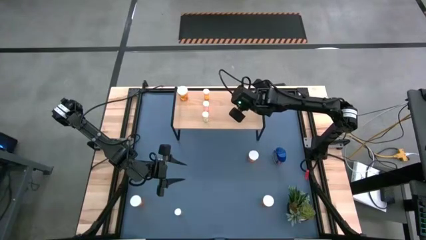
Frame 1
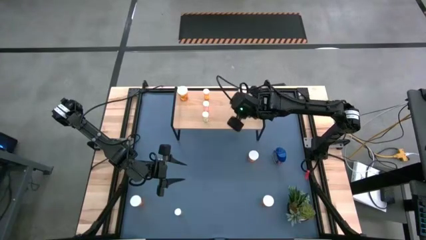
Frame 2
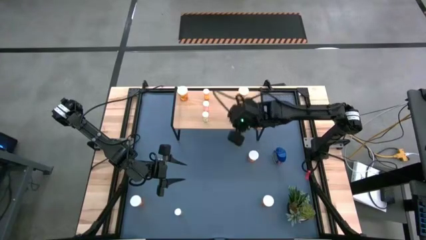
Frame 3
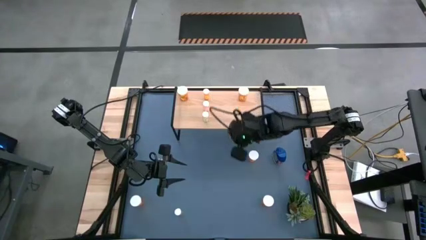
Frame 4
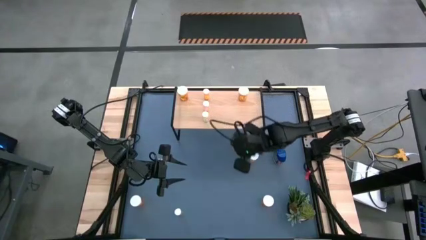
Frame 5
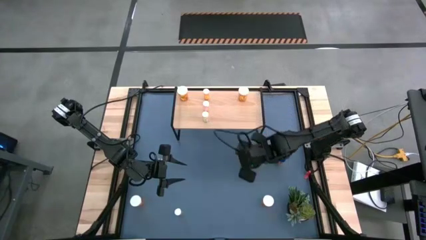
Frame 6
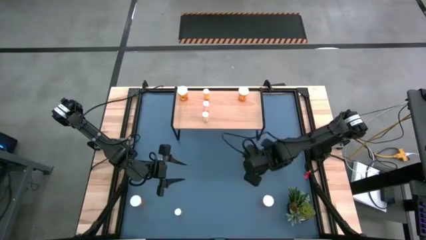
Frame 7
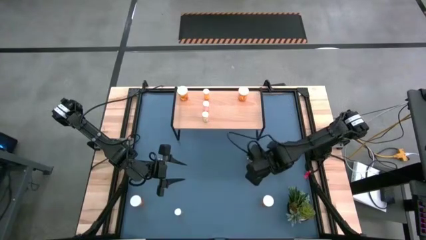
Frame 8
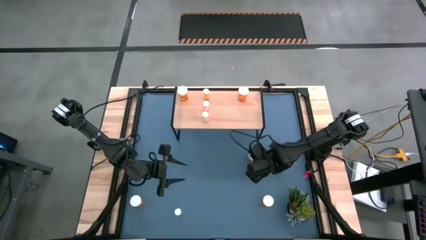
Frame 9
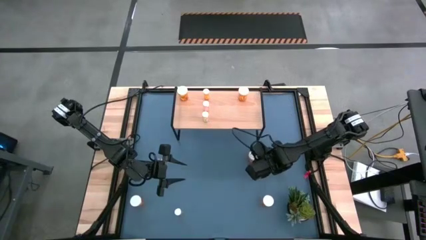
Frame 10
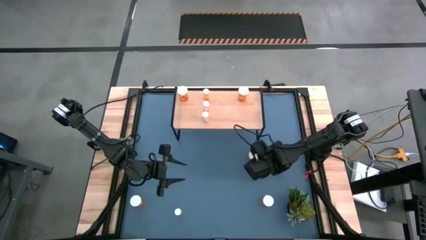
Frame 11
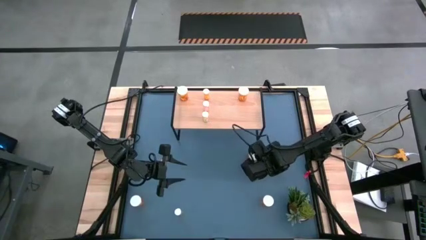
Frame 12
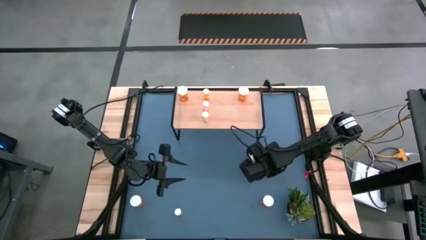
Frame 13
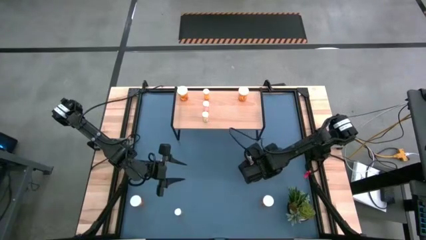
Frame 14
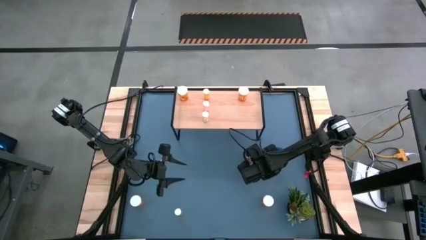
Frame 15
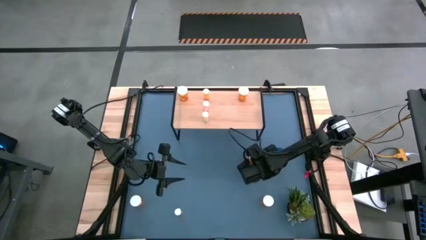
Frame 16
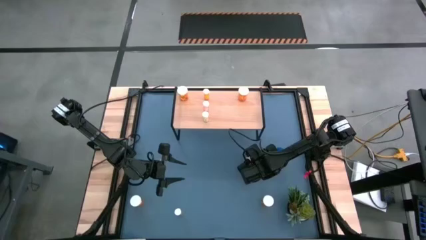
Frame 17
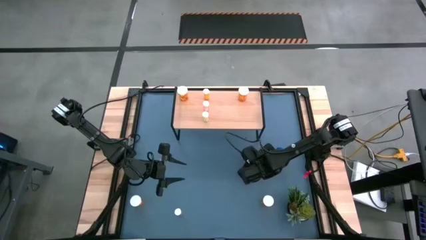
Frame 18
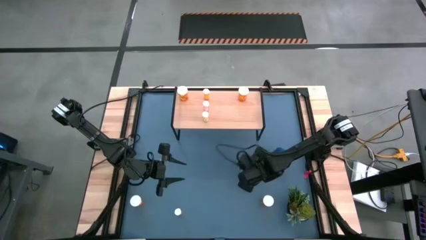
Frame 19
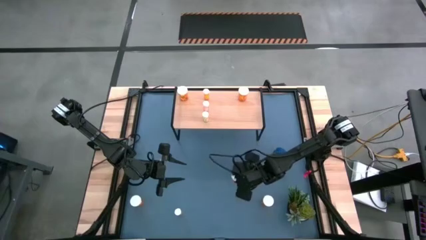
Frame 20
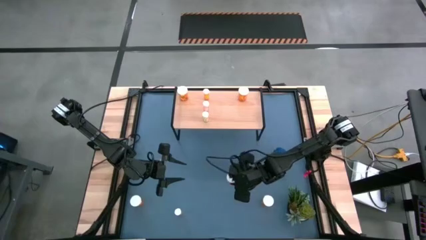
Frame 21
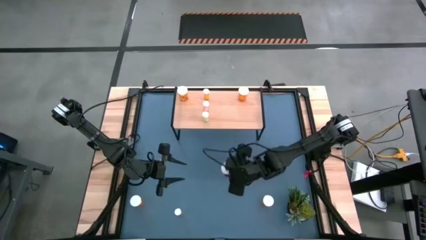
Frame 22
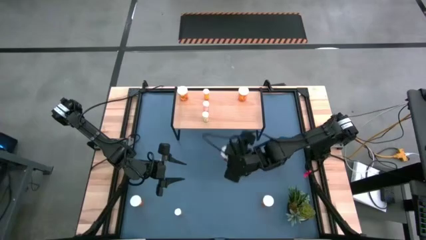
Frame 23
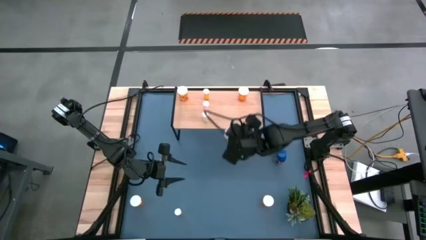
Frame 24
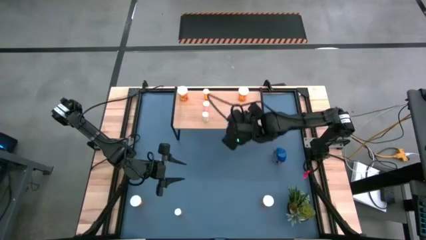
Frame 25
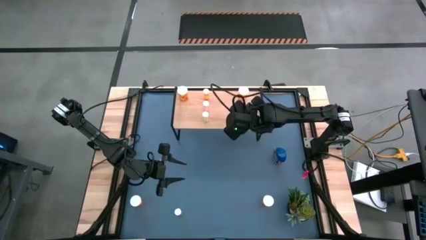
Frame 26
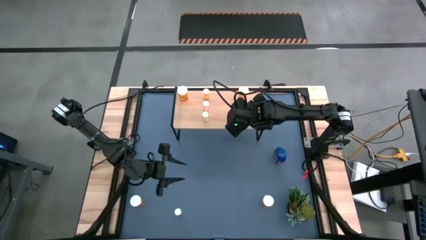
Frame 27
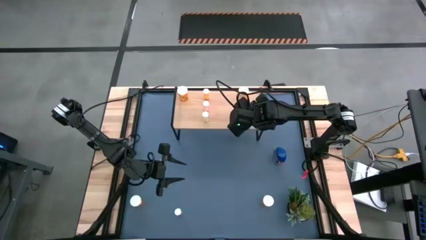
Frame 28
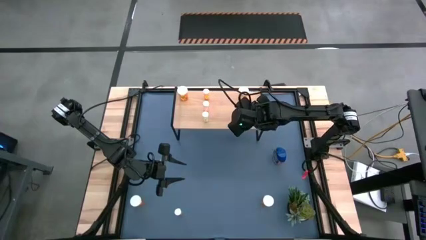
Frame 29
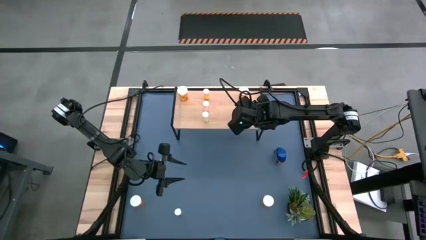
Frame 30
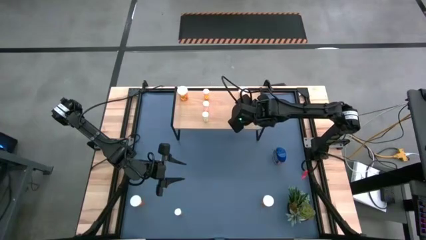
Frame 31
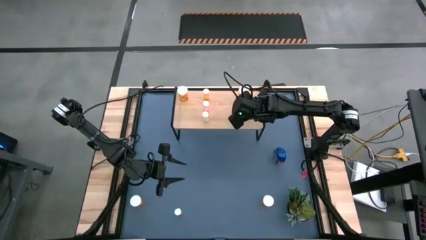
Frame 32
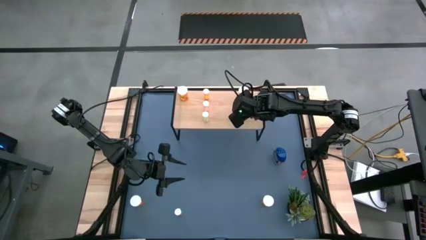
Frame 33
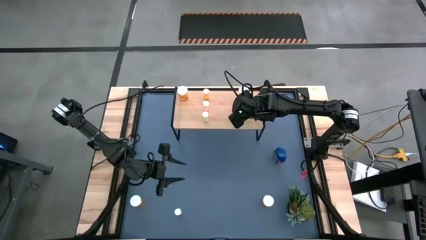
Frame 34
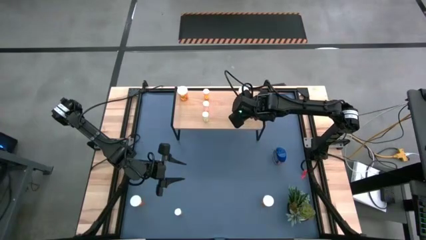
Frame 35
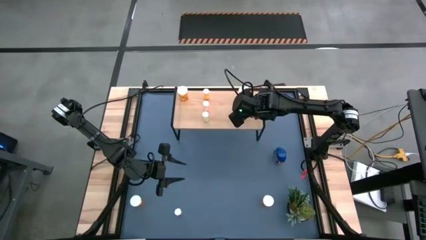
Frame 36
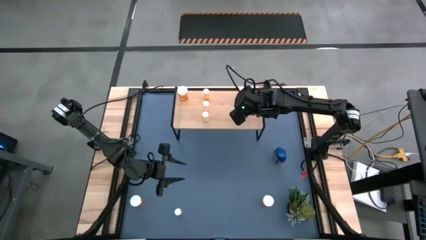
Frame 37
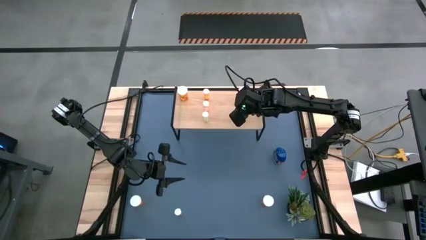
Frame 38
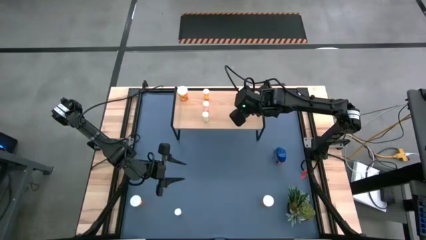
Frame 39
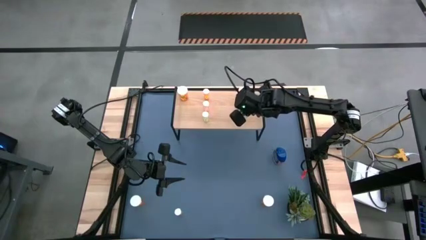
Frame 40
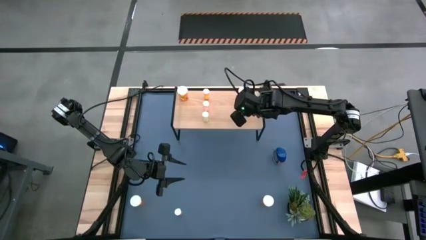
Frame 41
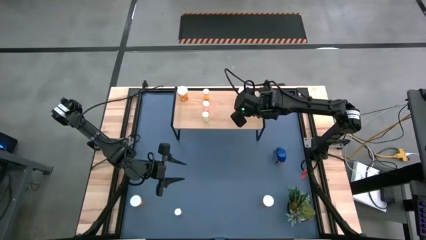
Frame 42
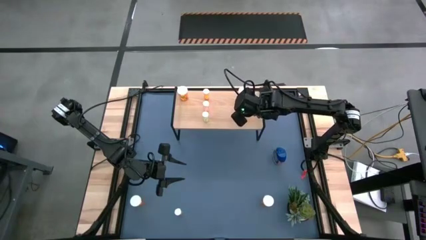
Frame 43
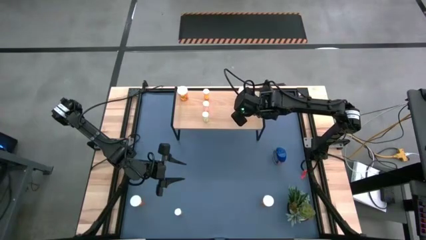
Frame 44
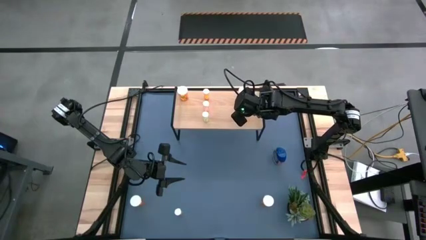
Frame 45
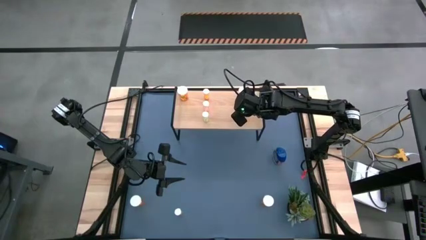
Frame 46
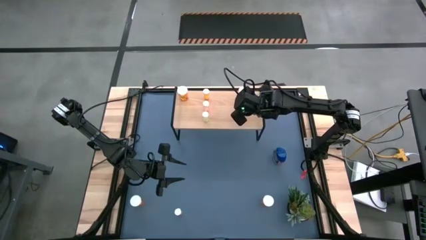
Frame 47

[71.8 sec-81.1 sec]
Task: Pick and place medicine bottles onto shelf by color
Align the large orange pill bottle with the other large orange pill bottle on the shelf

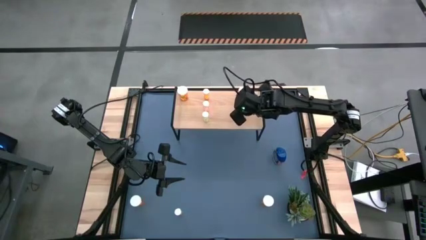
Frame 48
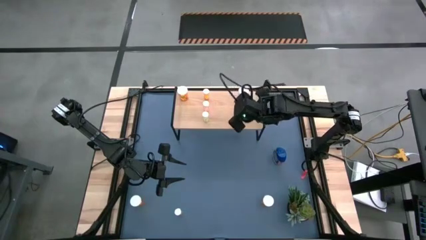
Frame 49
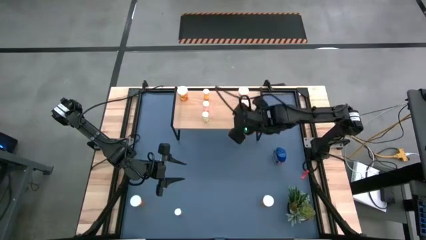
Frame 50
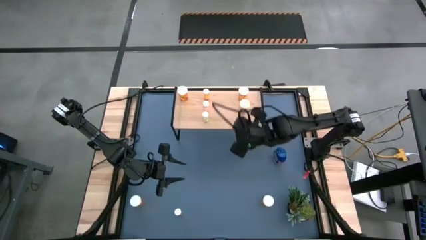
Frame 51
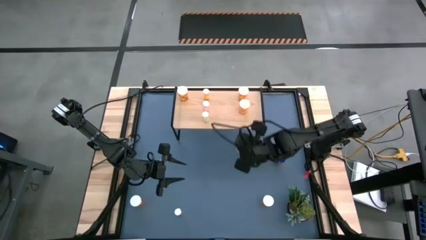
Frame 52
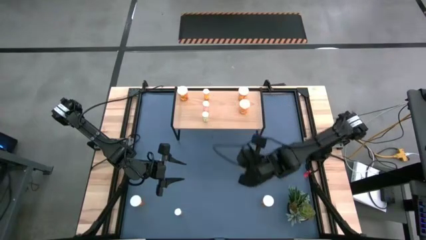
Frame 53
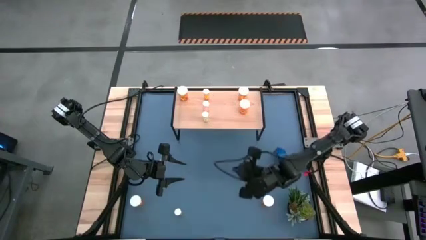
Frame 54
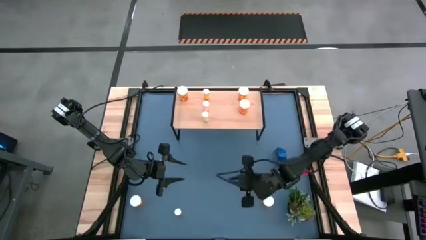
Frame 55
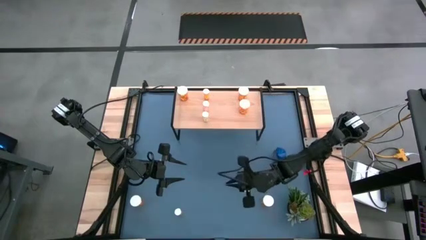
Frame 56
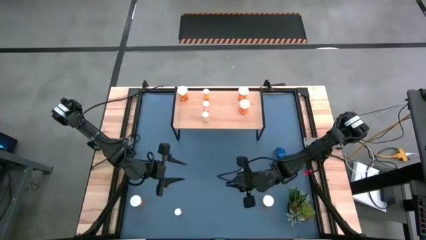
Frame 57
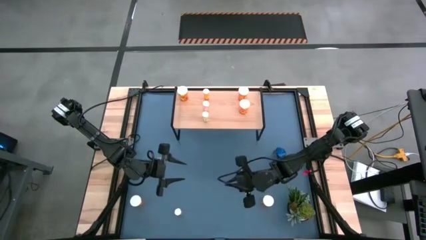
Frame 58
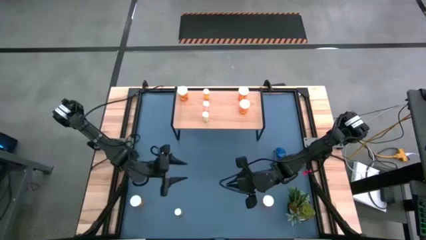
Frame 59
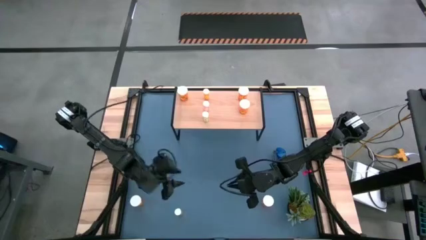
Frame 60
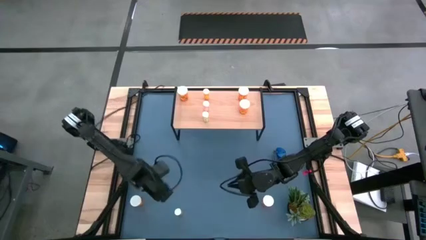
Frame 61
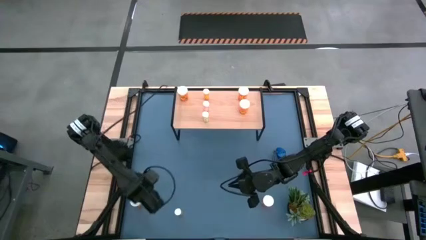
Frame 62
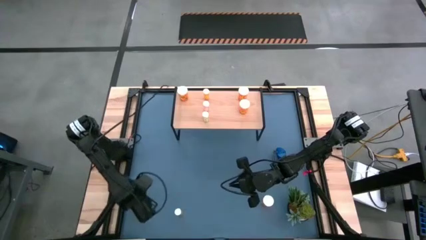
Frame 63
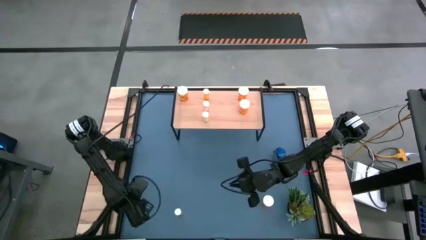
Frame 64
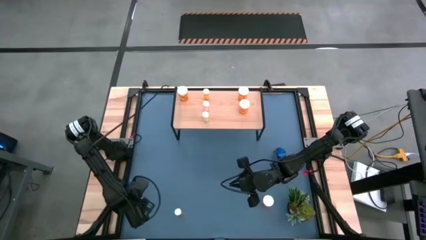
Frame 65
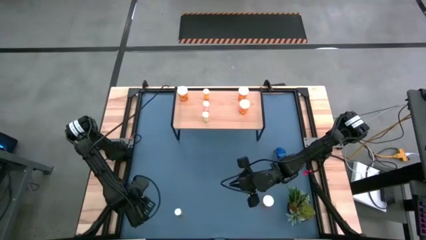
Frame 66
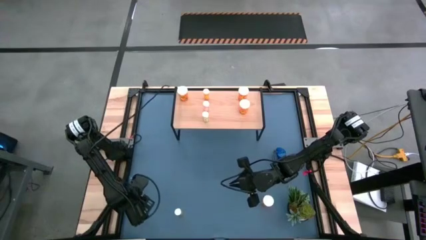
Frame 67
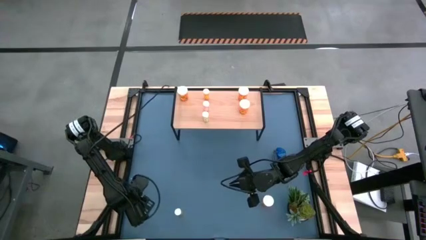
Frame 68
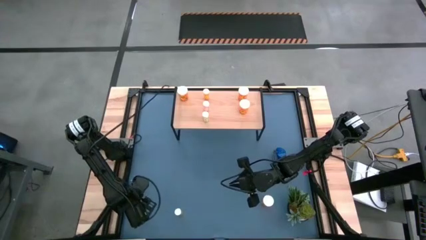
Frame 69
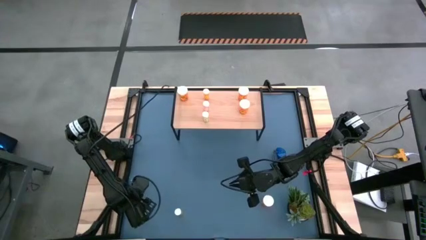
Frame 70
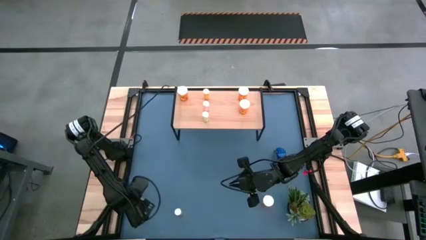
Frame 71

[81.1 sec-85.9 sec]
Align the large orange pill bottle with the other large orange pill bottles on the shelf
